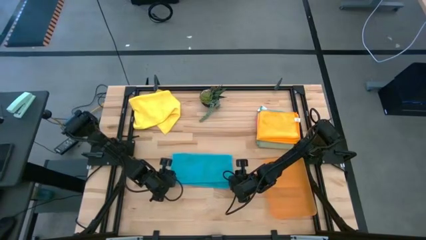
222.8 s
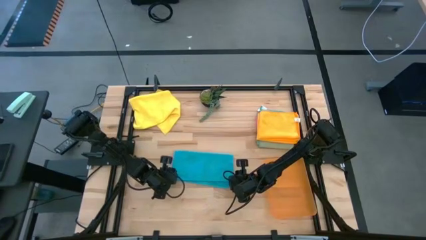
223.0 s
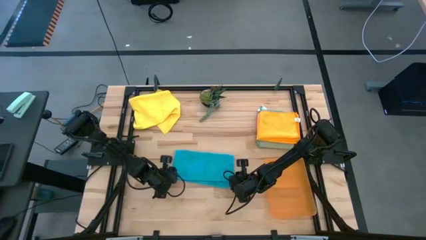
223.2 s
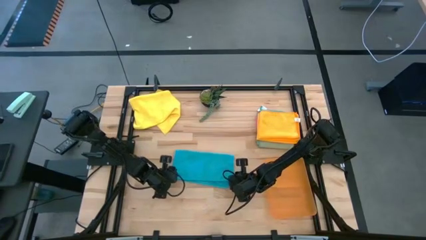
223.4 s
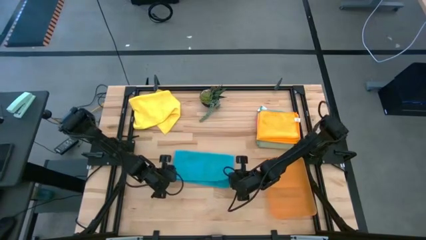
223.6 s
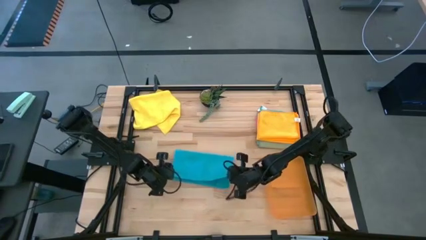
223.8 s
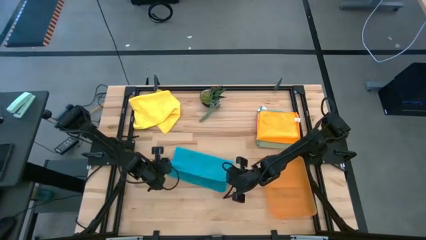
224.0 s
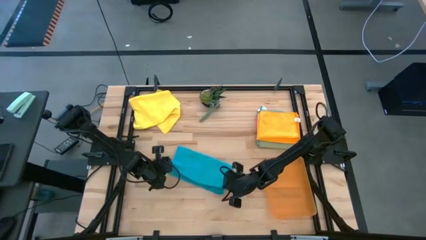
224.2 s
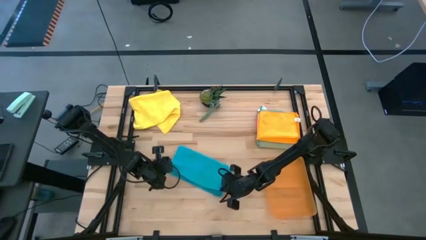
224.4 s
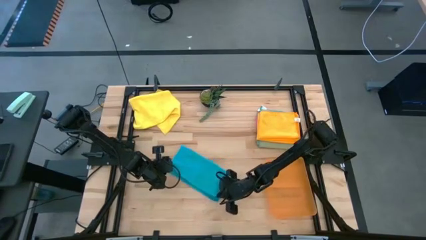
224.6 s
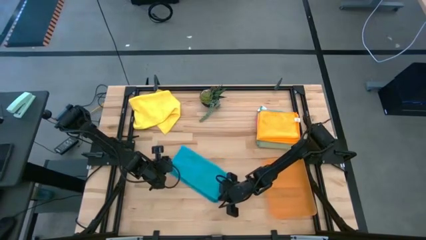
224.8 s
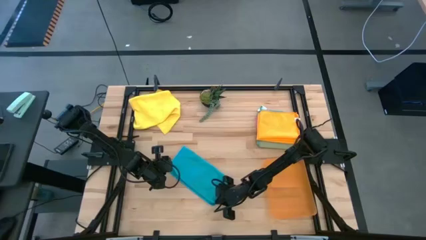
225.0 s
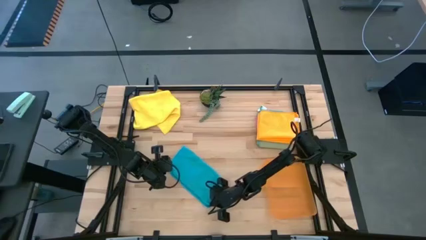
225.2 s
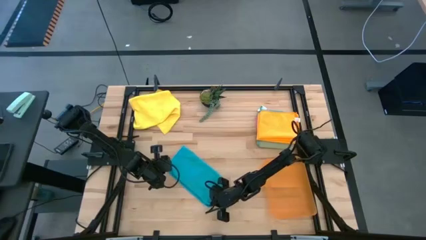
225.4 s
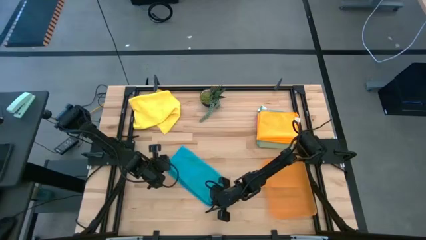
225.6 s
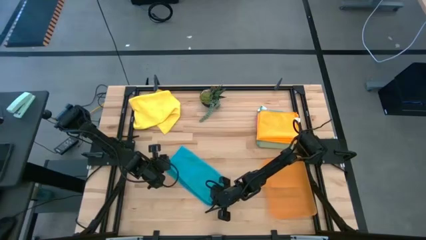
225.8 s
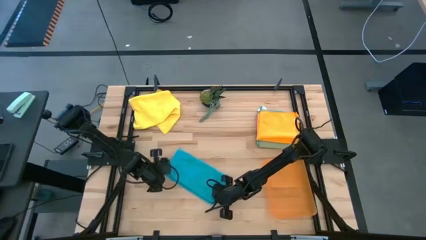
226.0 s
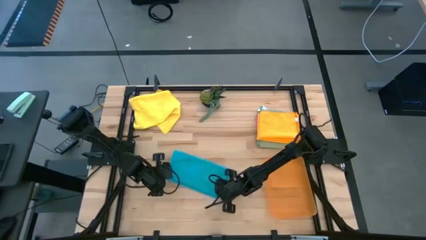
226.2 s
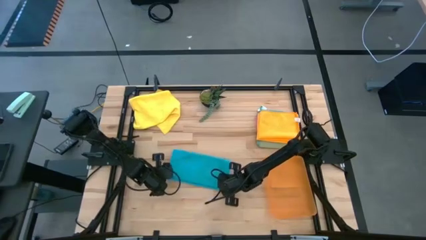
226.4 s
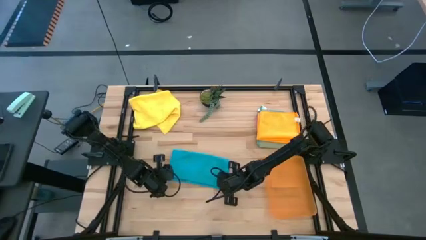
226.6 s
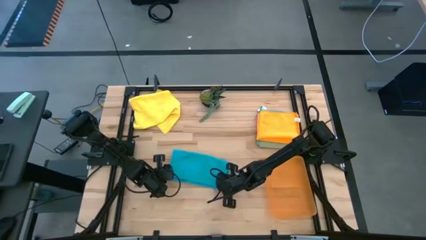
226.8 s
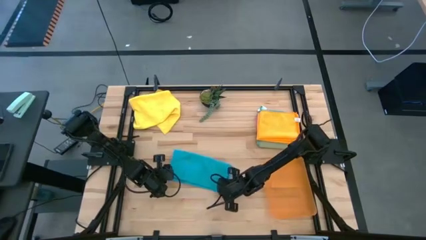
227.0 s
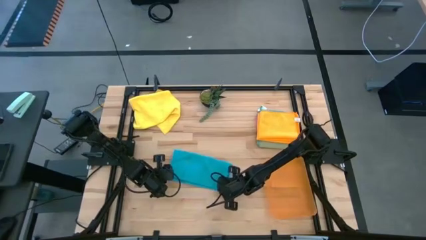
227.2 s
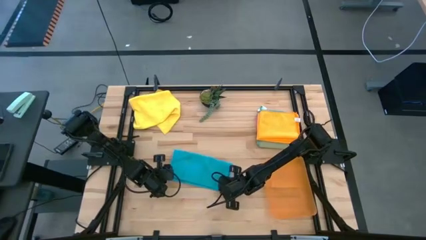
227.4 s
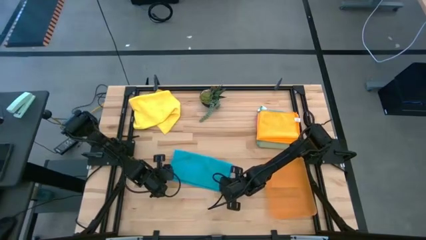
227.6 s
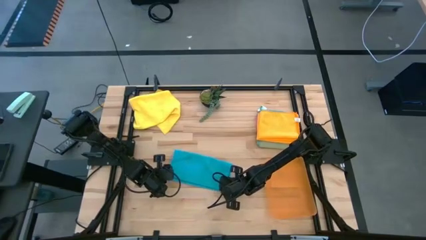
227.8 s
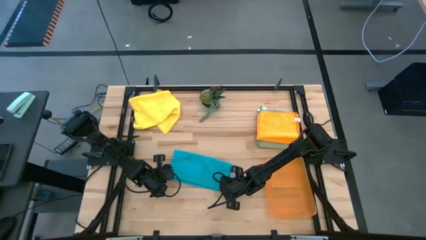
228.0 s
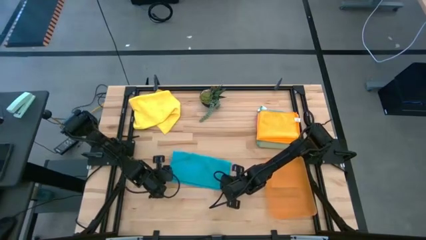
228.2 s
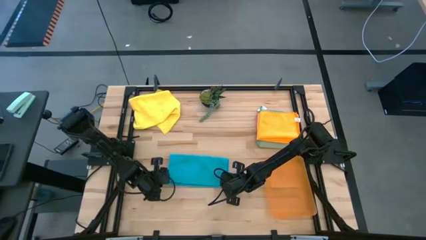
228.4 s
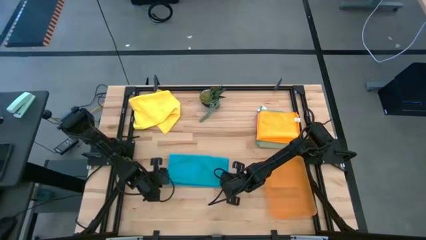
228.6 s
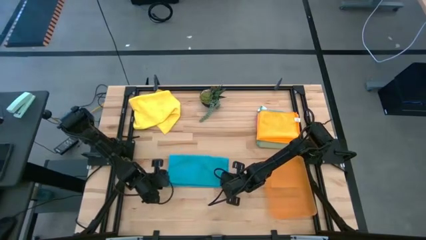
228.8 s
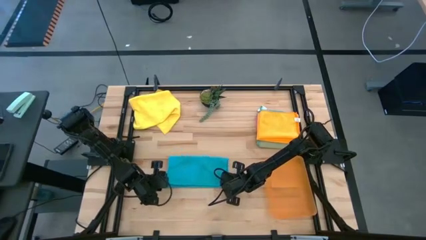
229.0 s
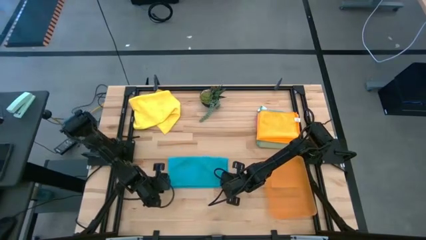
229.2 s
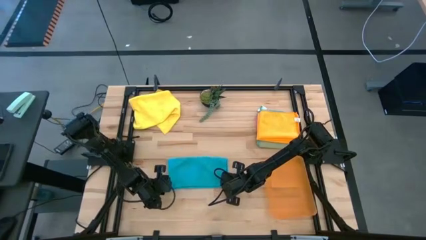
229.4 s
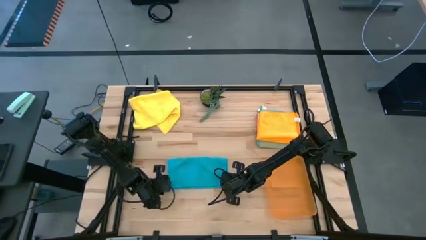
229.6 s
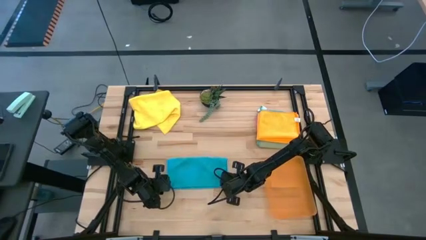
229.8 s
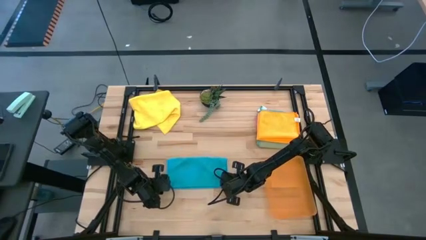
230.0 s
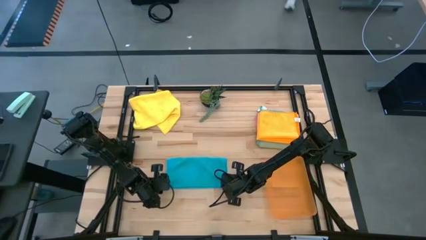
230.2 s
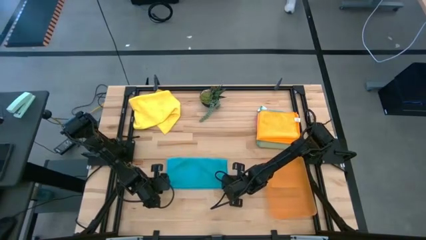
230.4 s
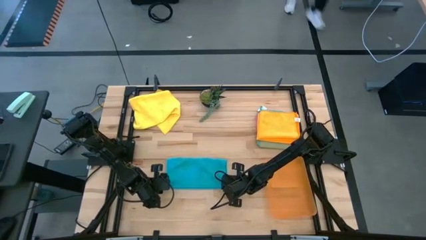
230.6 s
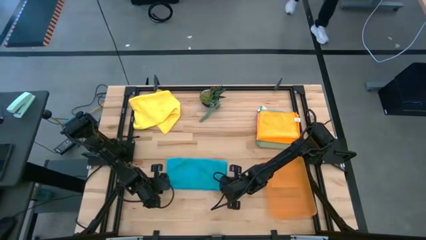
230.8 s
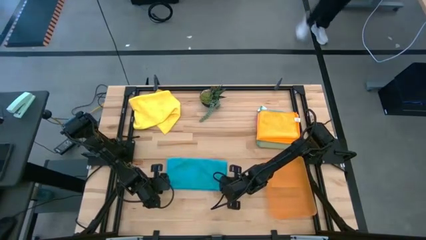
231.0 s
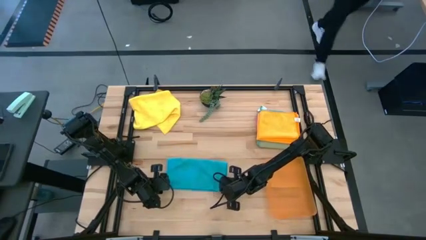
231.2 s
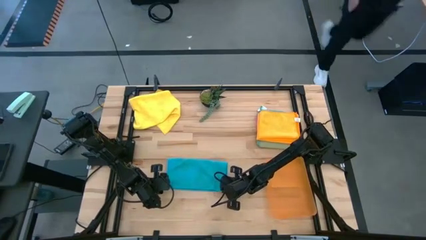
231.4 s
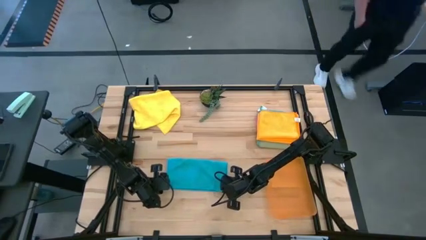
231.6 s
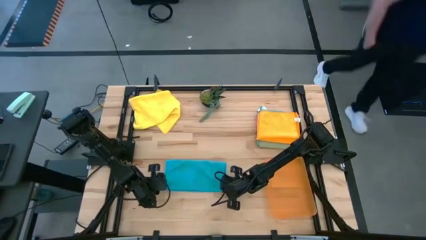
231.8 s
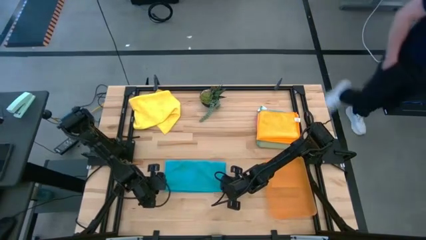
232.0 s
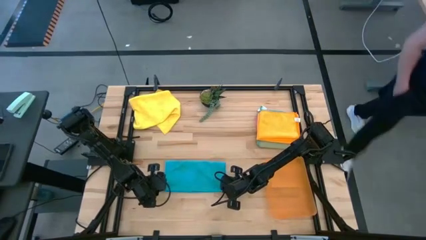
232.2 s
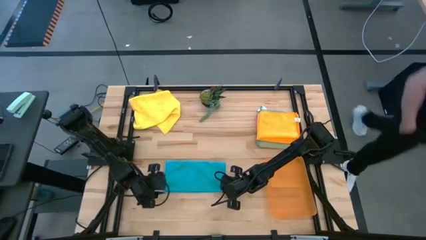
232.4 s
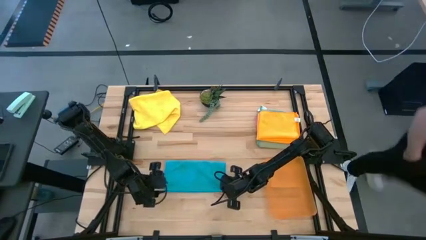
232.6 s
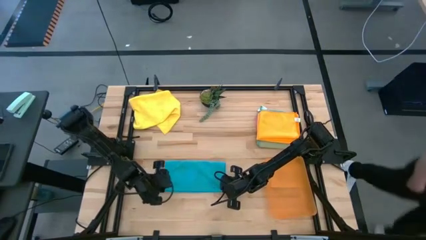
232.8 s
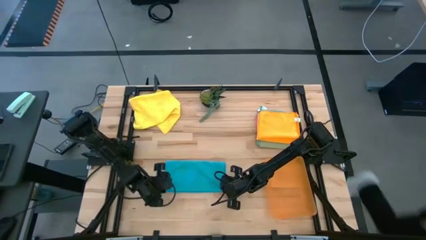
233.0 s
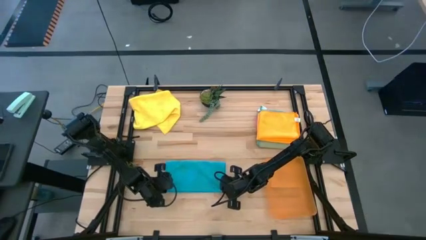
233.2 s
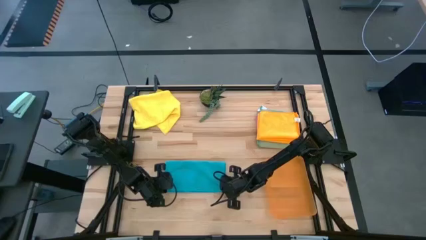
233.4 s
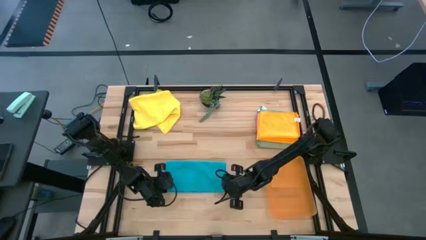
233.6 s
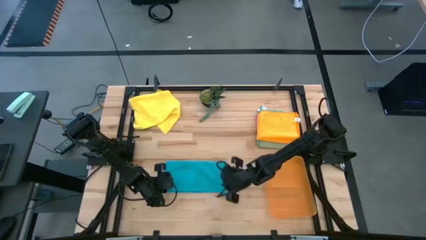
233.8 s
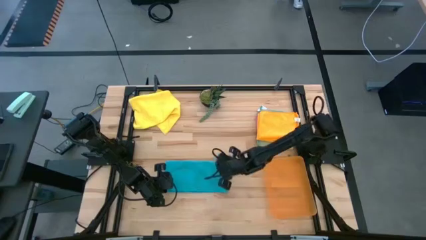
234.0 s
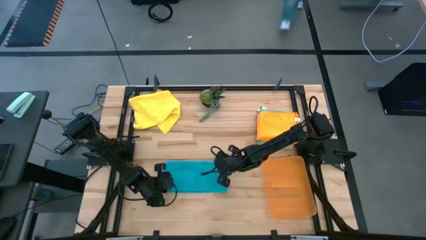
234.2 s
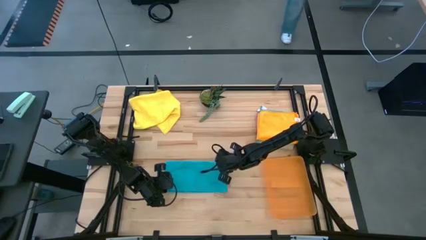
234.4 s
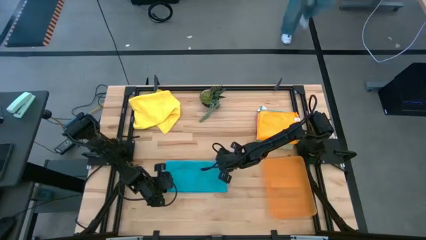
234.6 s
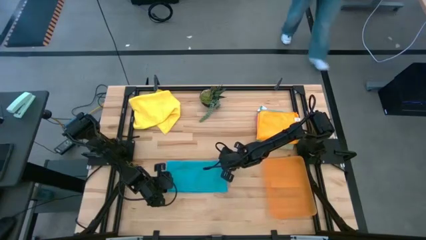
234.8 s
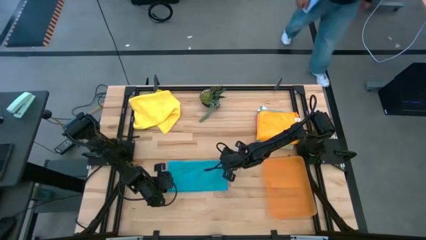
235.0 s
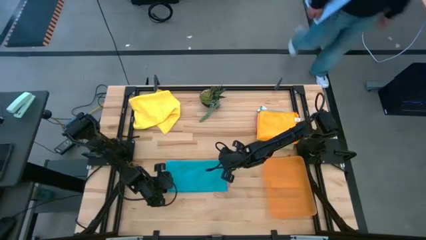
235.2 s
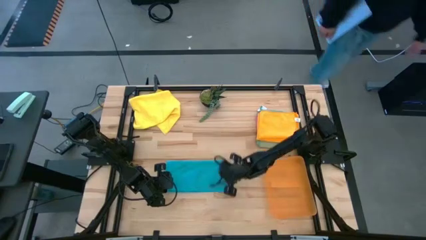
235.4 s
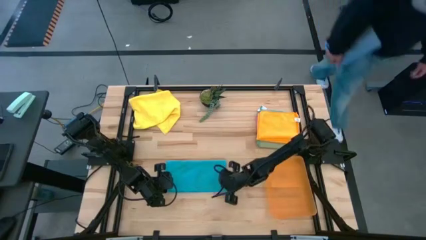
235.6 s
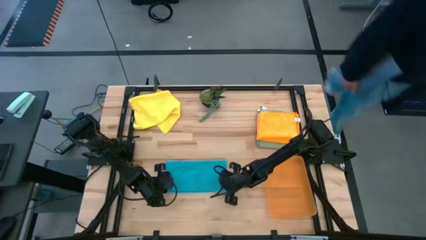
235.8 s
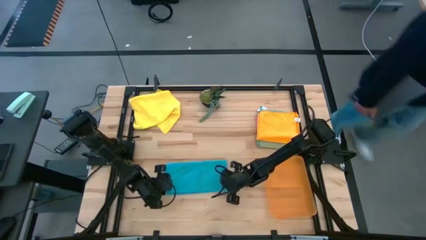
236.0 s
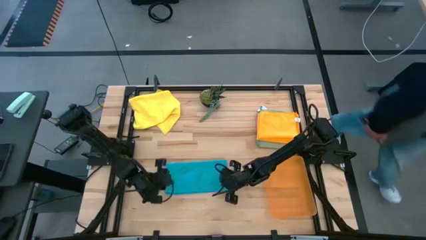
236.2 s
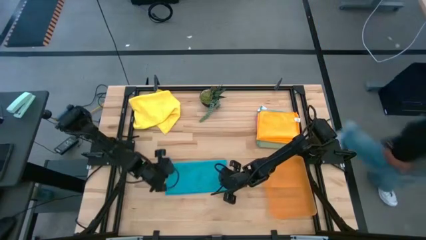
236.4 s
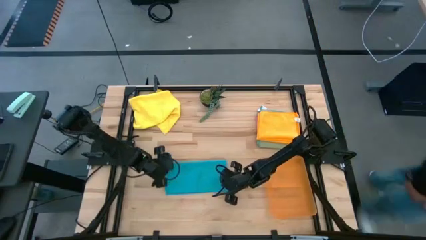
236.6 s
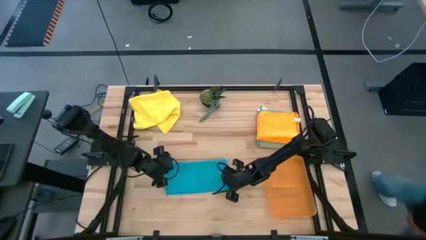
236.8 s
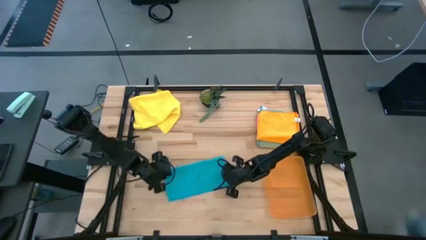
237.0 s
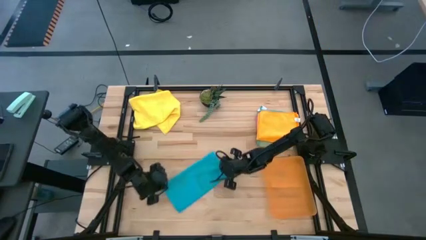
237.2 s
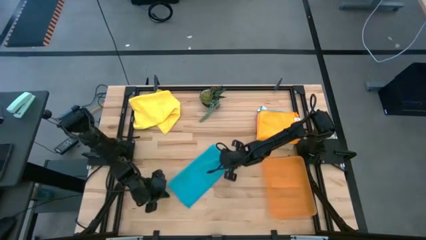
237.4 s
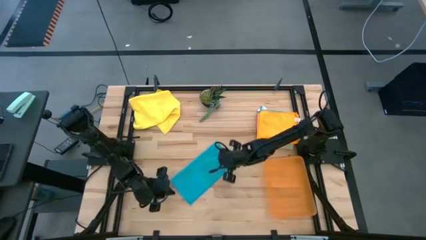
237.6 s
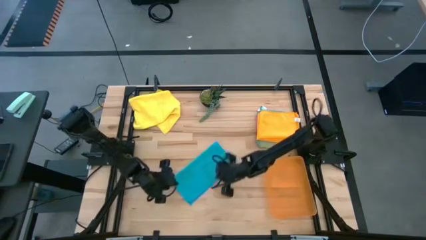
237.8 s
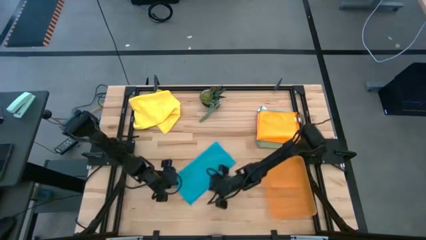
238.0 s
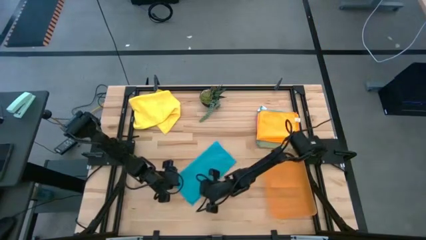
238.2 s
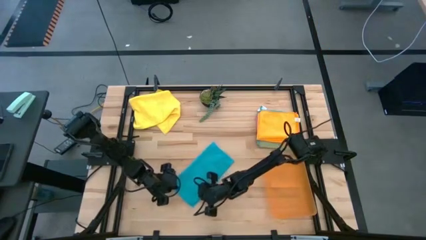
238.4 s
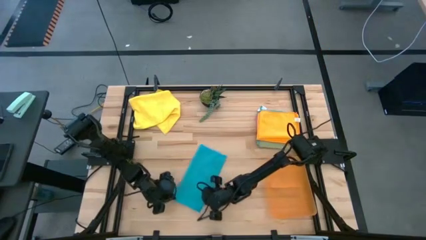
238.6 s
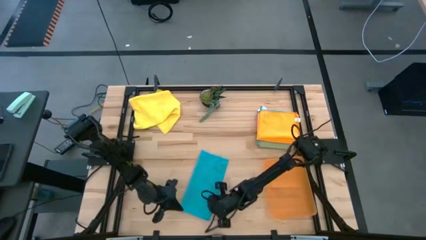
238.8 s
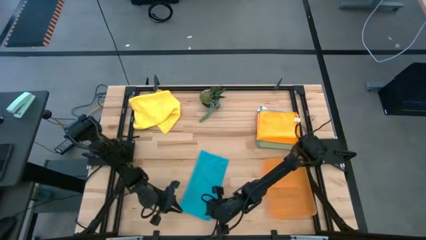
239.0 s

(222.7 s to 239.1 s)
Task: Fold microfiber towels
Fold the blue microfiber towel
